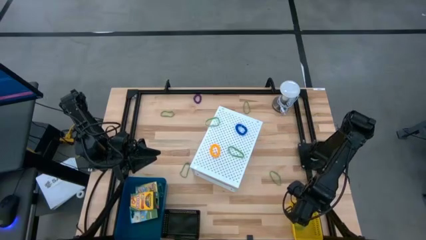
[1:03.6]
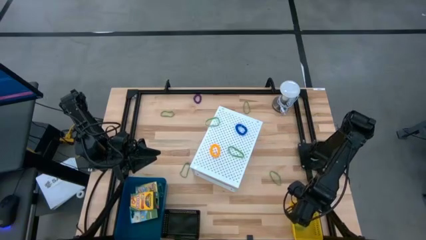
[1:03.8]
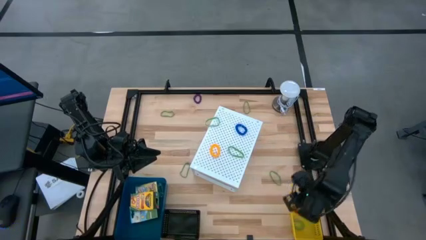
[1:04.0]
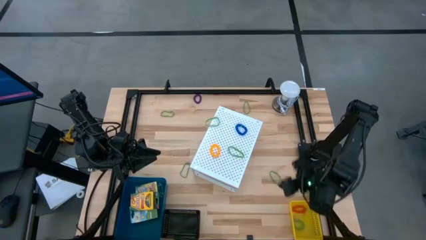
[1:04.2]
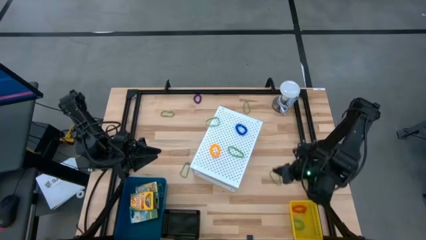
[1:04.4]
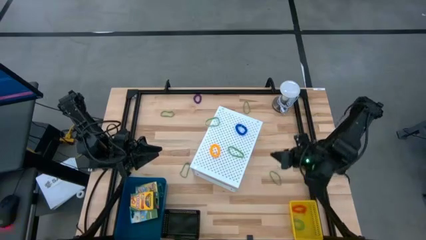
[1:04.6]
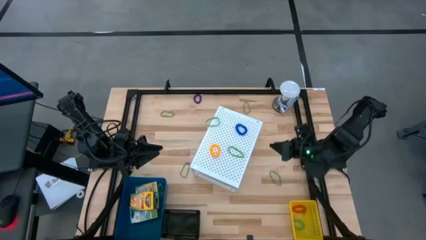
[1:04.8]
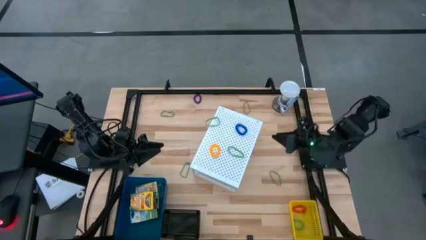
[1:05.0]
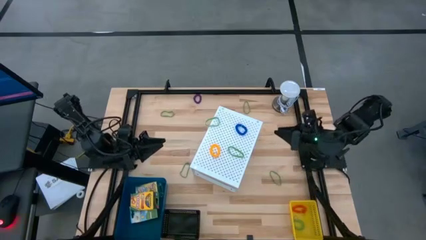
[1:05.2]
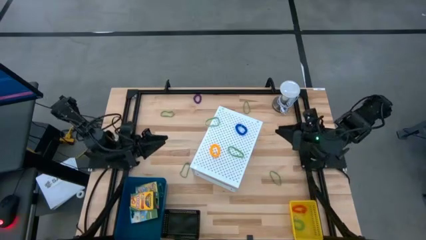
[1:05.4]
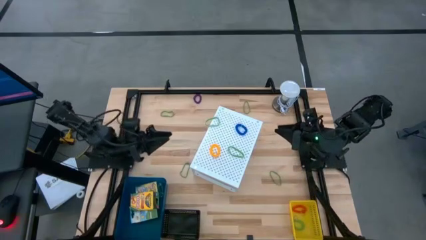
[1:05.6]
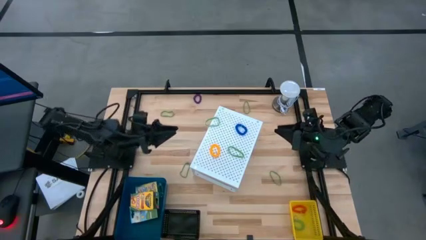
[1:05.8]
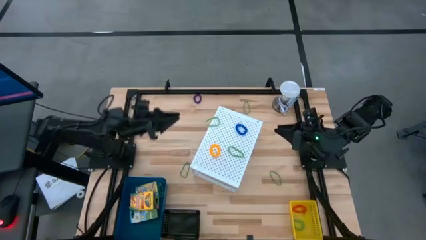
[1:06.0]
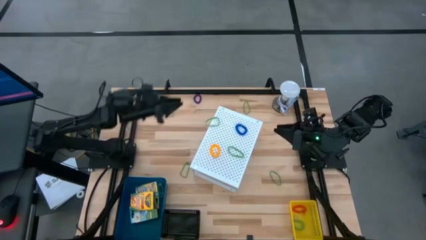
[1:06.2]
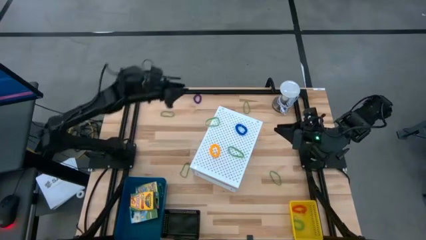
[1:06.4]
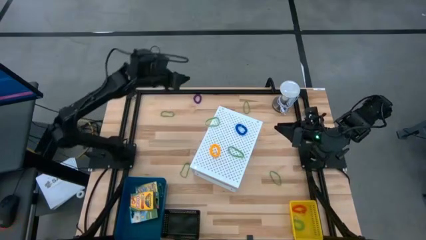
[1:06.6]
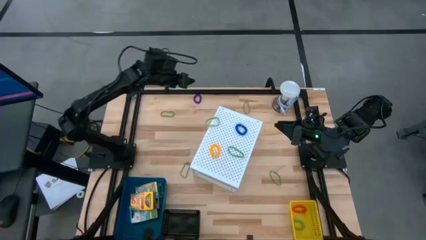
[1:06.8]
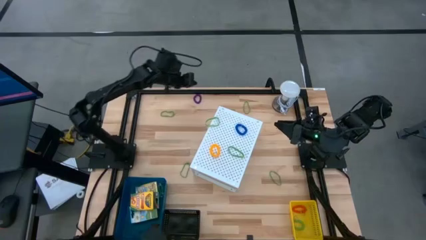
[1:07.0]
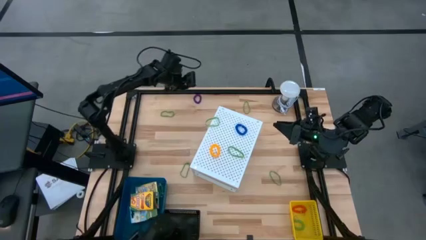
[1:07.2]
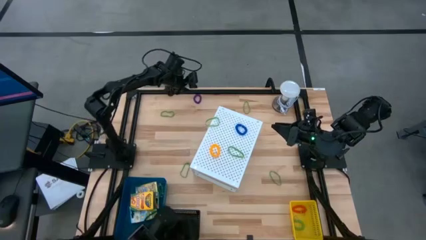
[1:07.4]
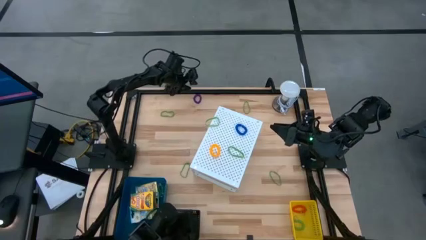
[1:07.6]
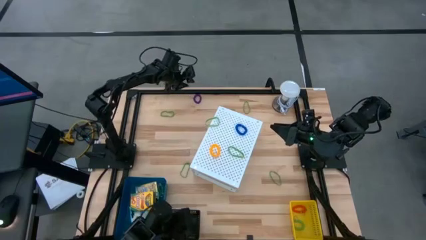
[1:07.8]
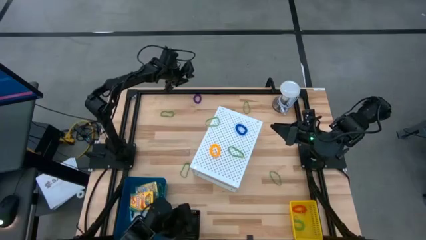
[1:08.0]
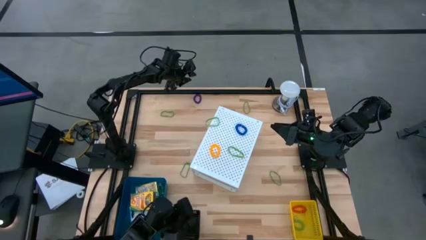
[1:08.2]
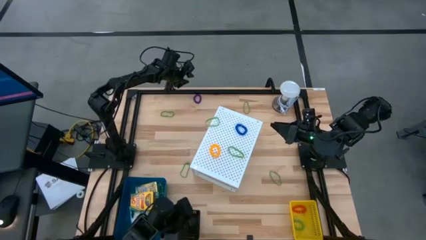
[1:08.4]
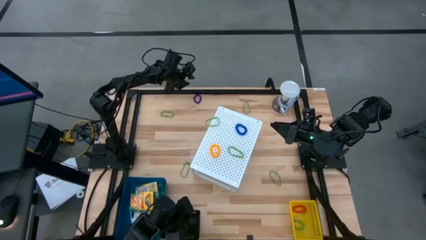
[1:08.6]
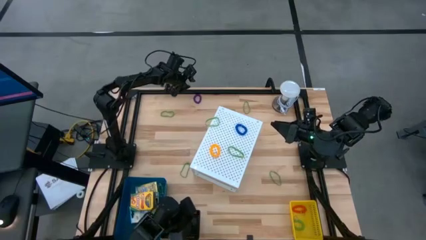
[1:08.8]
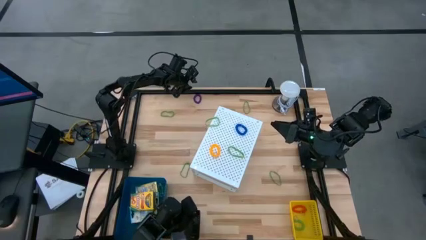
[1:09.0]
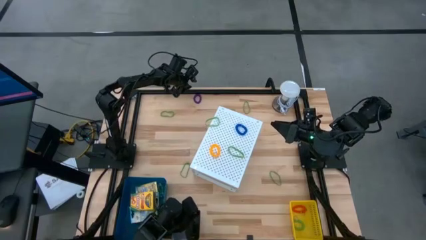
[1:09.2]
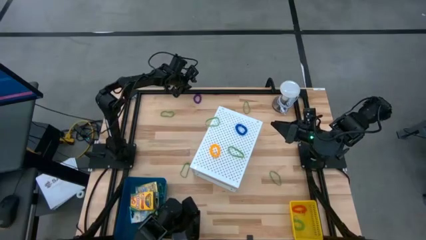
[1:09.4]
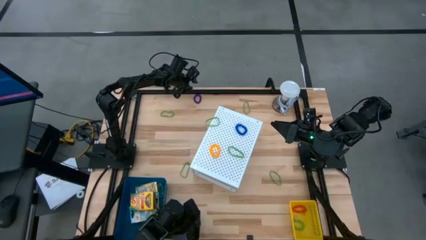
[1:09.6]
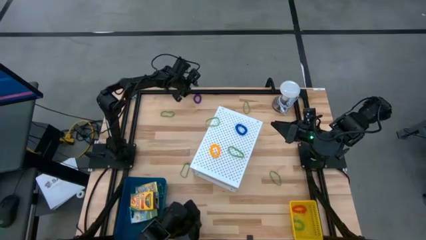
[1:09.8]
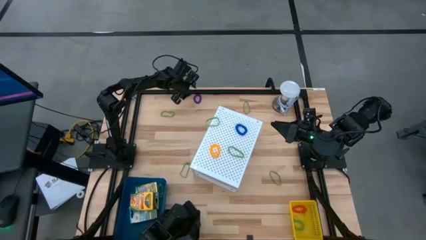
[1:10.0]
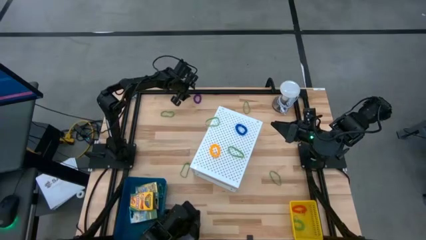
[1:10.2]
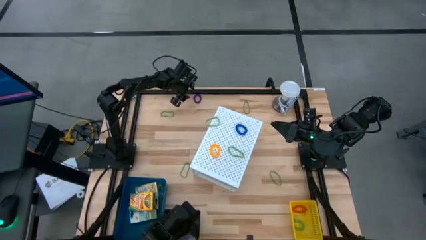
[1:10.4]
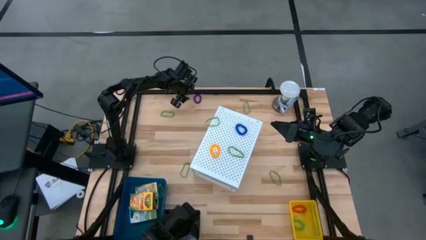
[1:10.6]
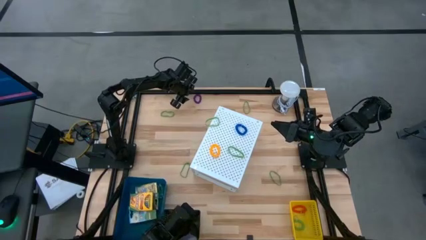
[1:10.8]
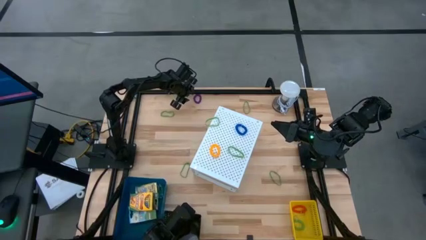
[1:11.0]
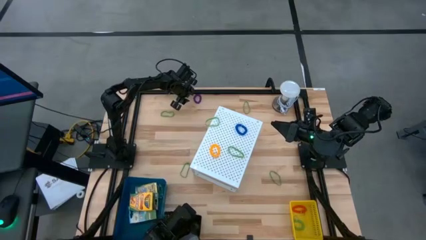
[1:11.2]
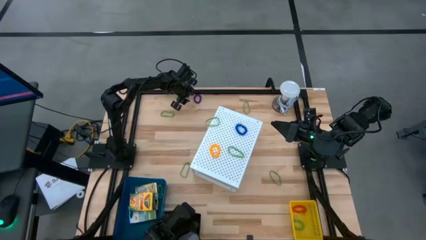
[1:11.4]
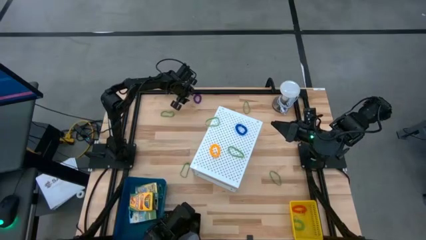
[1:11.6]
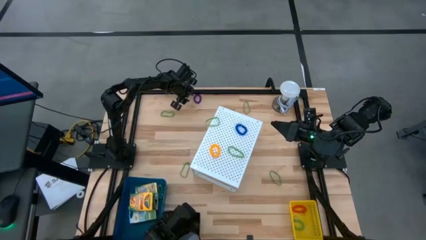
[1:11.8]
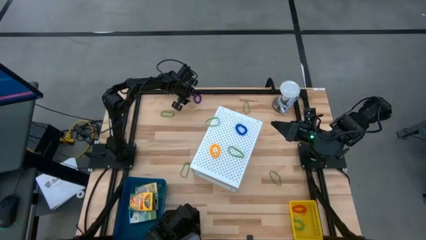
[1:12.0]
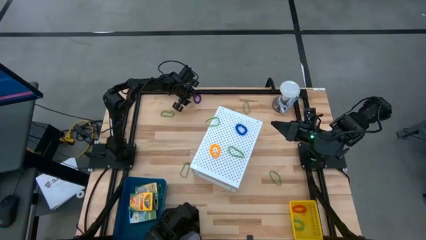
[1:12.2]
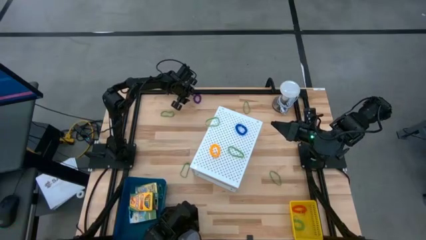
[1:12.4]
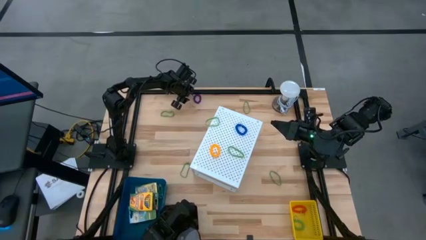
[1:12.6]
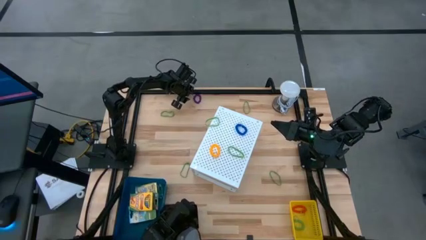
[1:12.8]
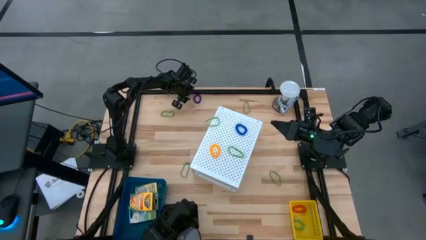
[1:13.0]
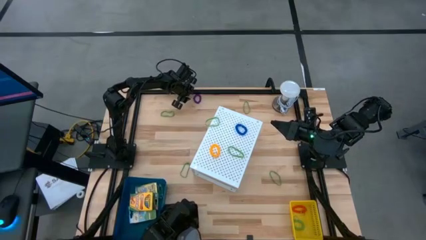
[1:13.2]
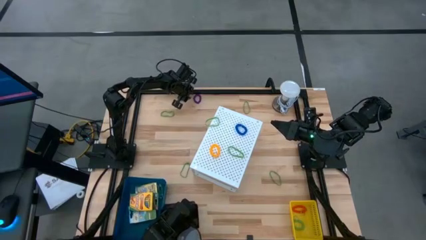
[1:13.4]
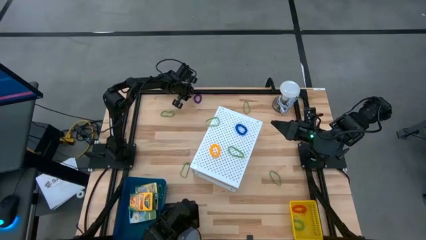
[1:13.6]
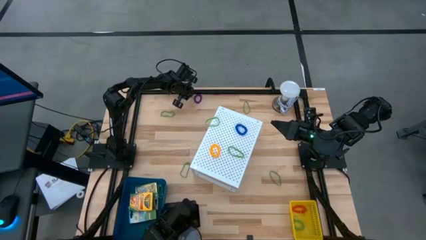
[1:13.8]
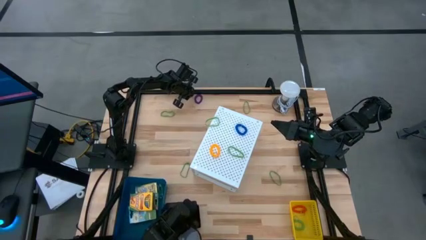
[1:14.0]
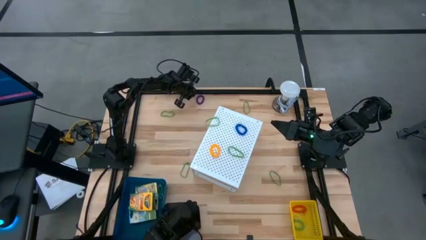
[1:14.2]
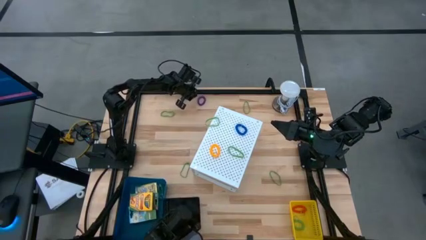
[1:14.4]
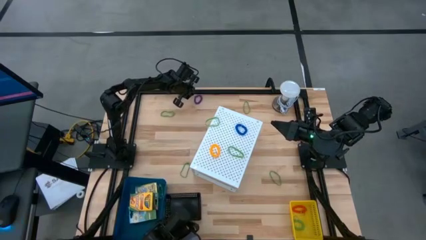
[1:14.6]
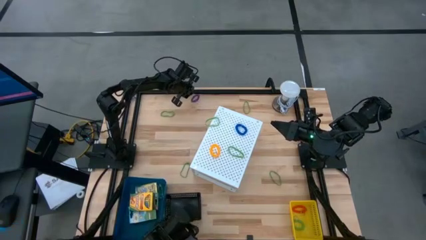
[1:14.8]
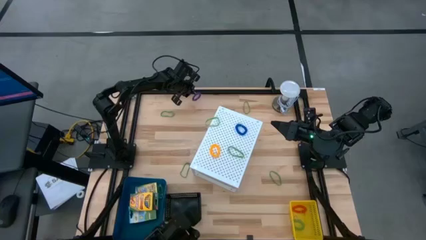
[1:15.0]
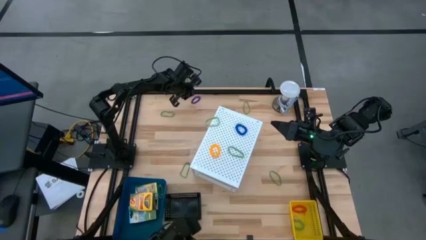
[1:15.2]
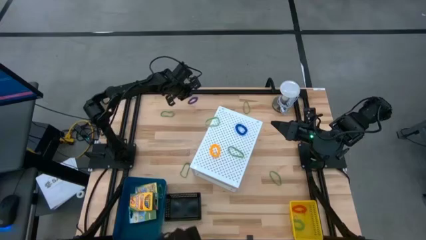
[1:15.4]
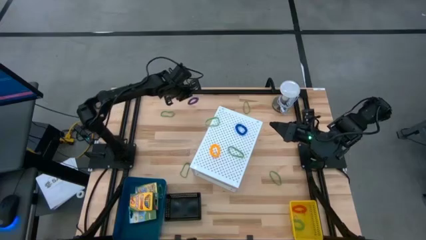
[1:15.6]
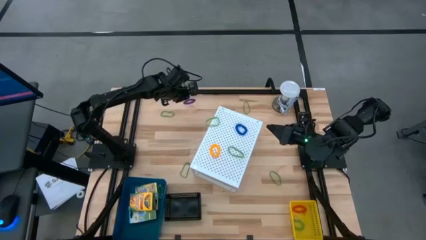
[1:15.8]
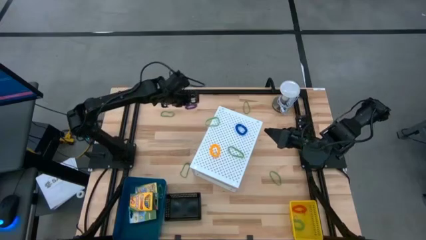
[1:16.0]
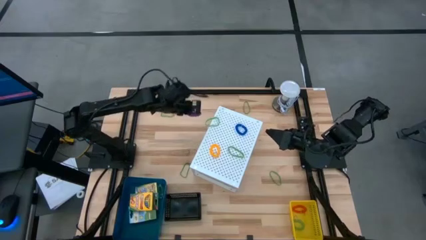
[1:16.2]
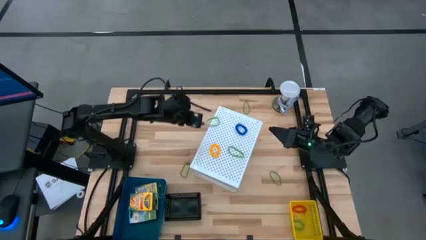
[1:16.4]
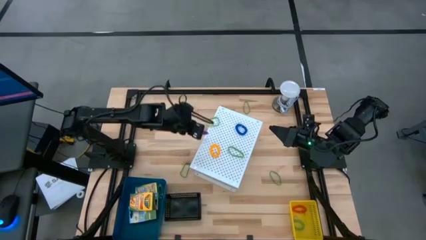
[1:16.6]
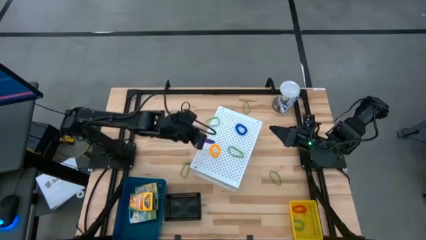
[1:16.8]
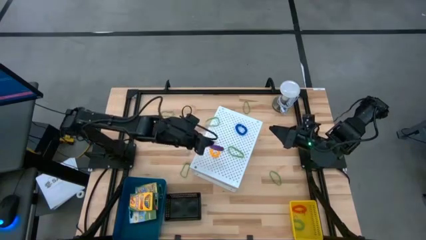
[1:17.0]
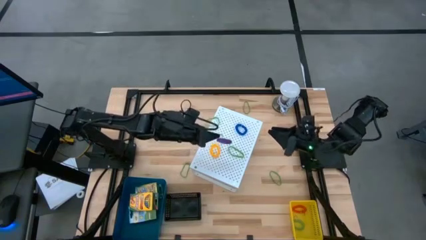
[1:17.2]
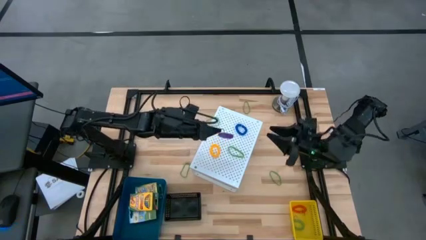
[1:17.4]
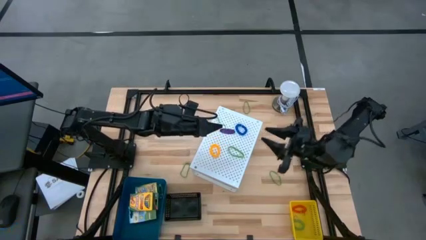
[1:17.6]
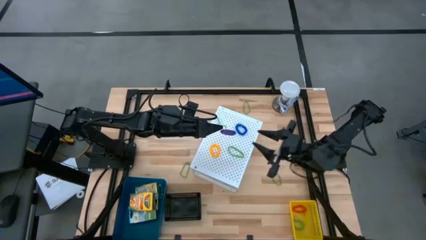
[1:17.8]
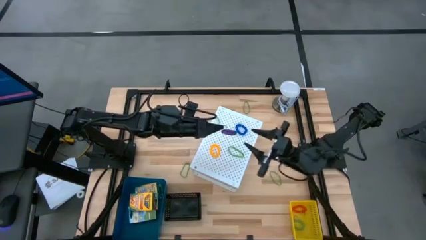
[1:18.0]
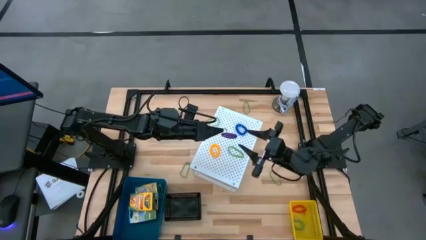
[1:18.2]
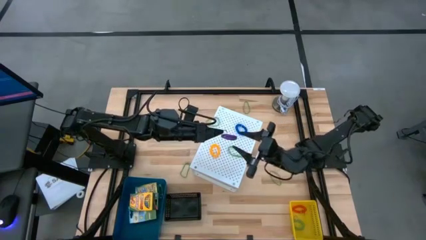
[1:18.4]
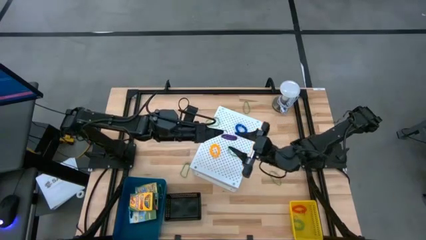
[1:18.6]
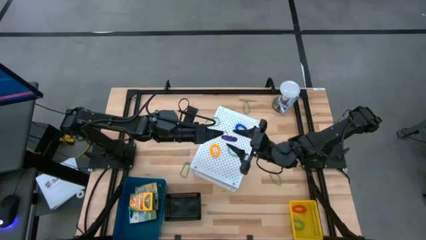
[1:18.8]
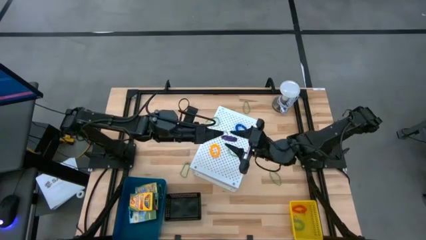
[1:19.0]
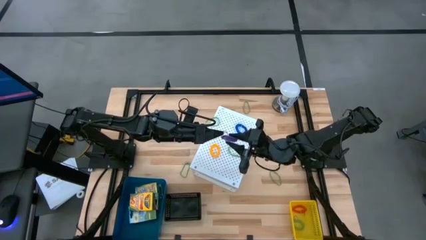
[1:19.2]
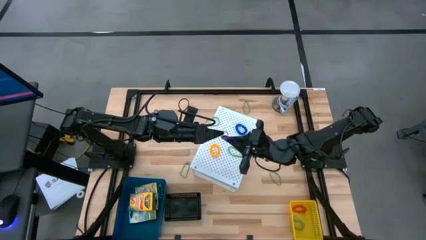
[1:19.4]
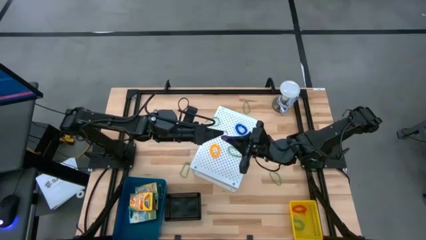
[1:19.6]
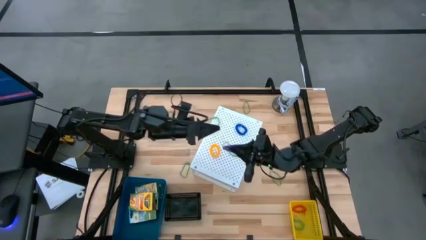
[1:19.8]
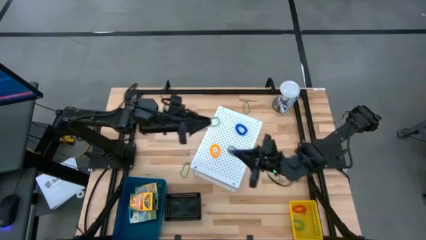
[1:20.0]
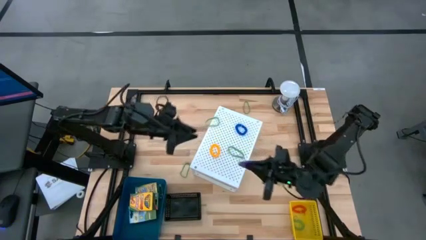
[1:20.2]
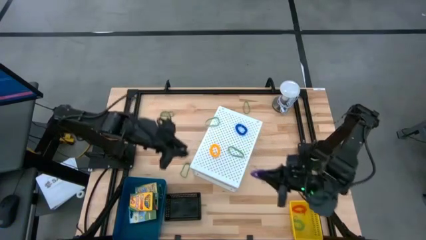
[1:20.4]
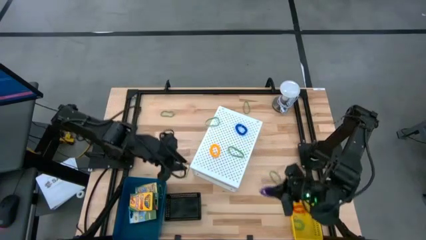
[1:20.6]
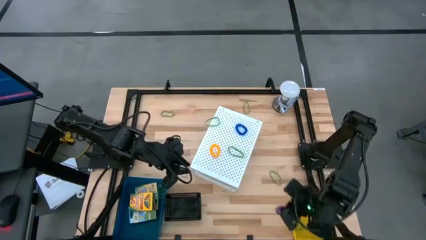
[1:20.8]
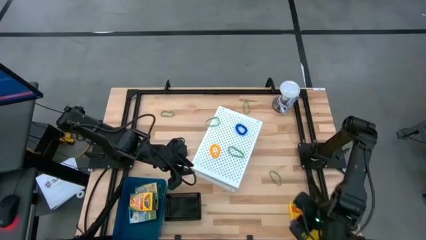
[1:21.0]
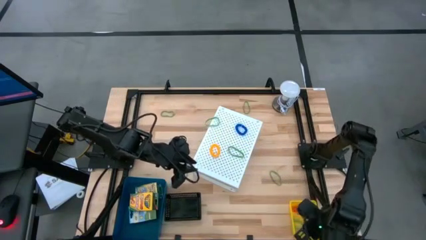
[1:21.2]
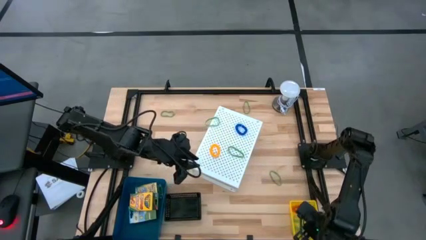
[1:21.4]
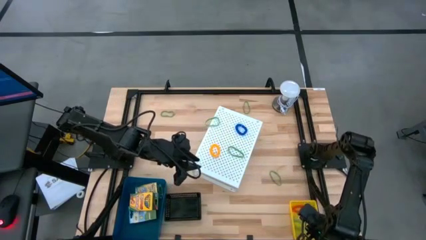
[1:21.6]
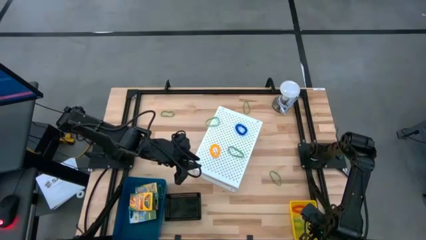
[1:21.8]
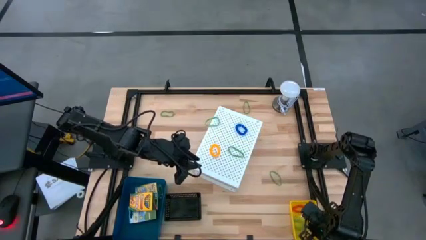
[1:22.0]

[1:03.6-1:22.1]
Task: Pick & Place Office Desk Supplies
Put the purple spring keychain into the yellow bin
